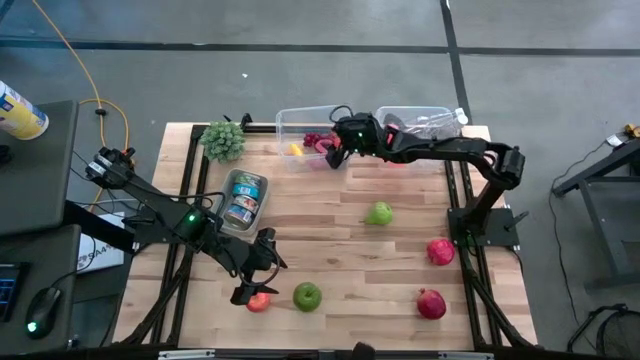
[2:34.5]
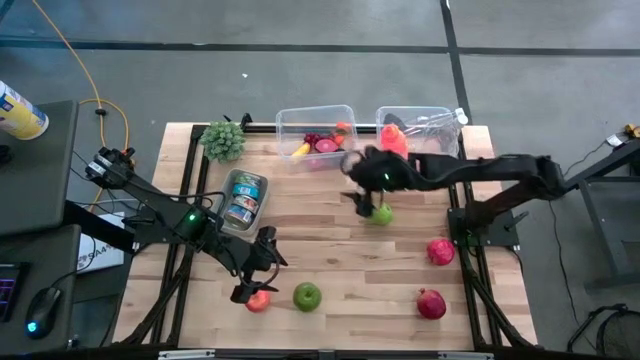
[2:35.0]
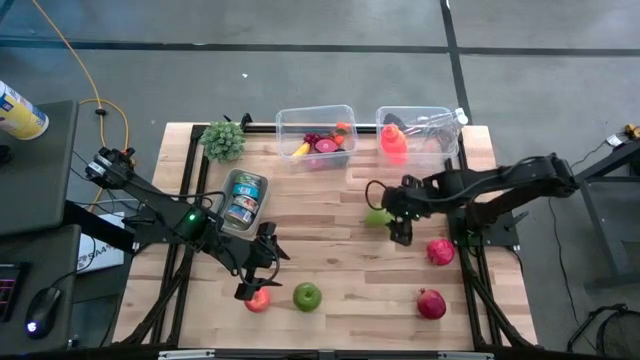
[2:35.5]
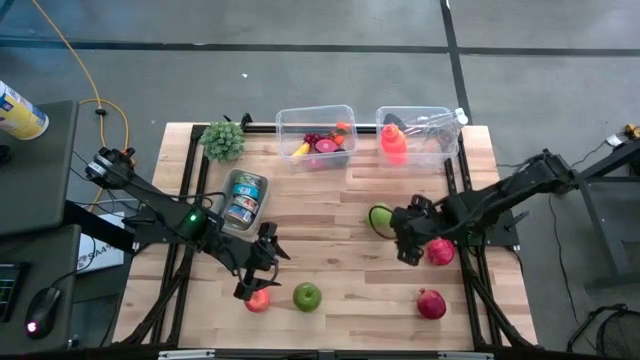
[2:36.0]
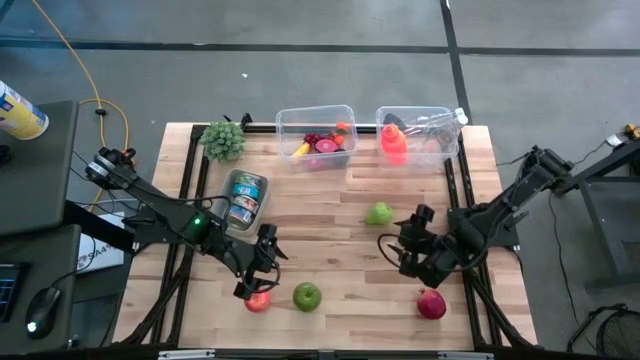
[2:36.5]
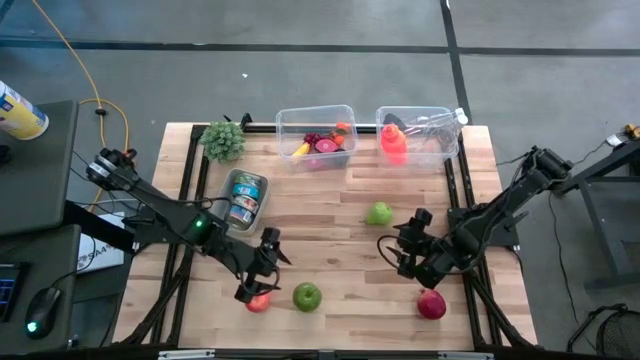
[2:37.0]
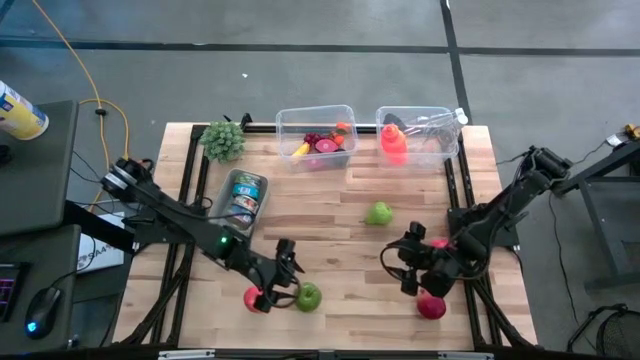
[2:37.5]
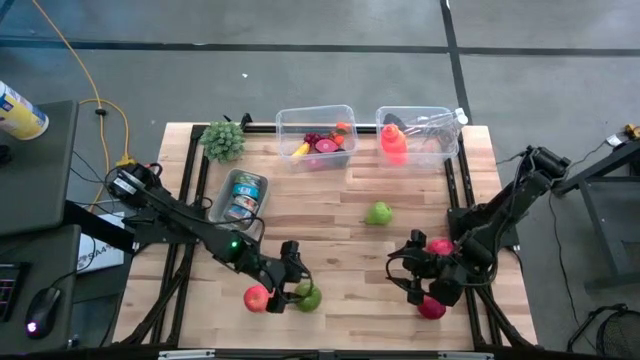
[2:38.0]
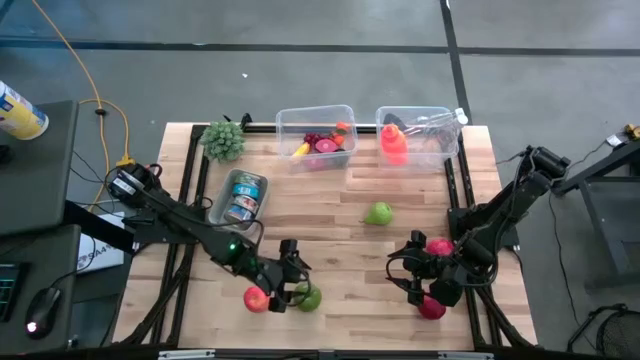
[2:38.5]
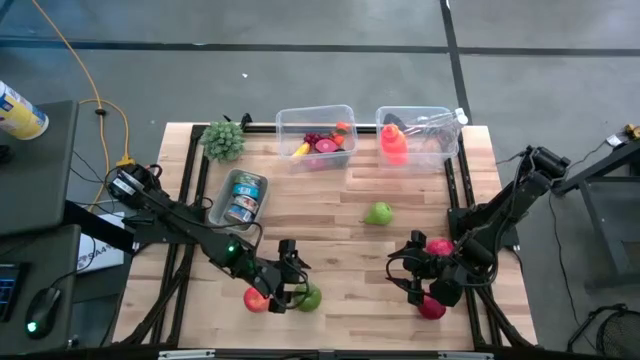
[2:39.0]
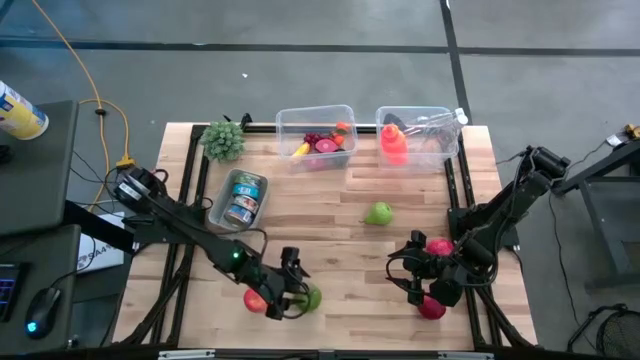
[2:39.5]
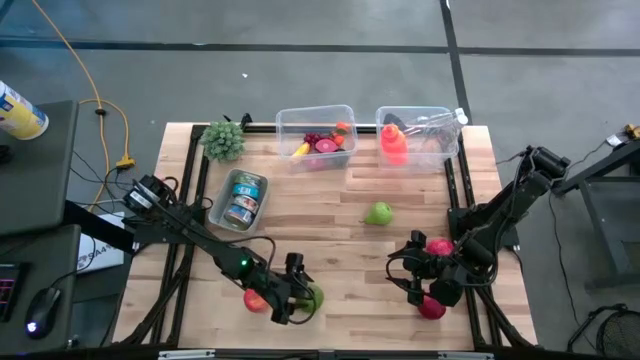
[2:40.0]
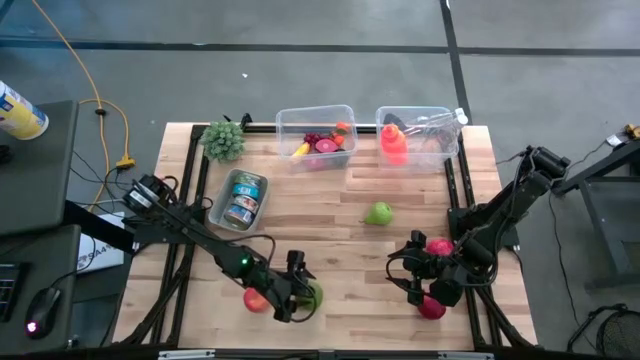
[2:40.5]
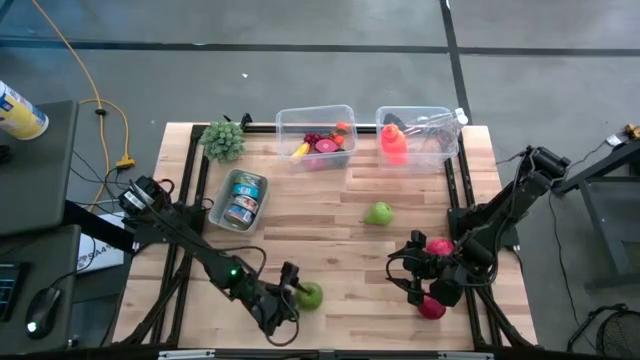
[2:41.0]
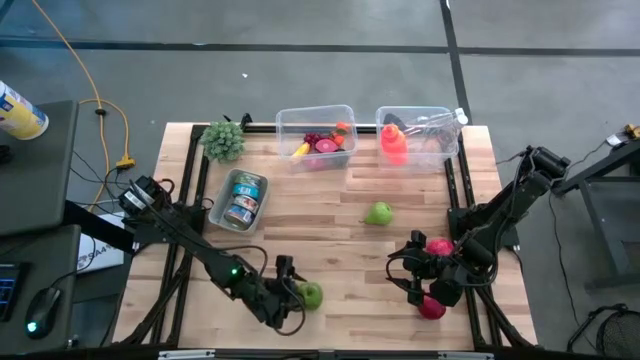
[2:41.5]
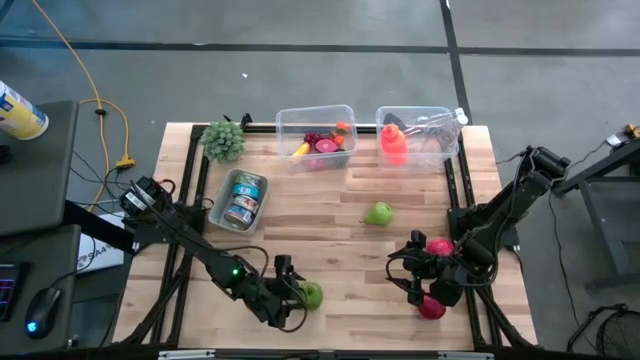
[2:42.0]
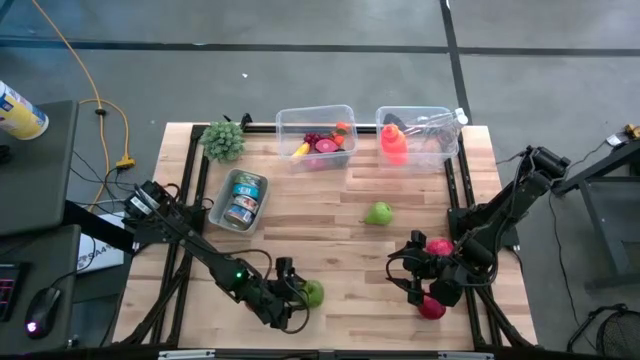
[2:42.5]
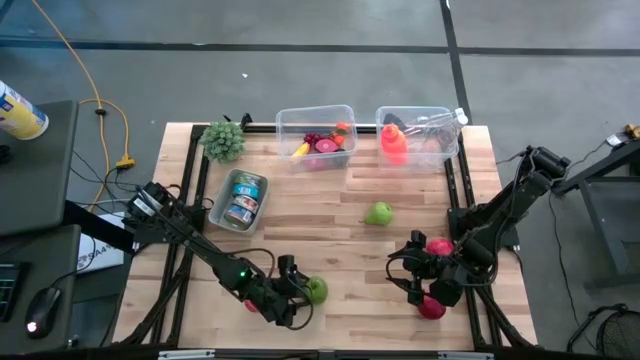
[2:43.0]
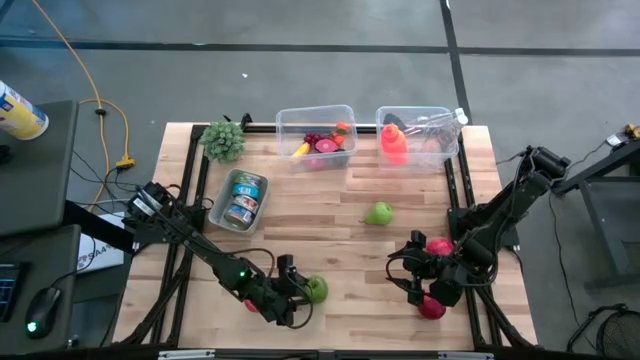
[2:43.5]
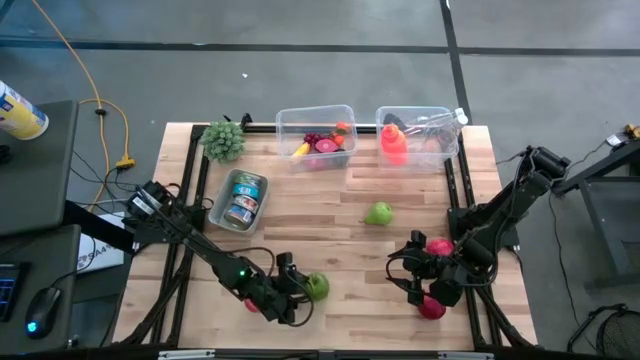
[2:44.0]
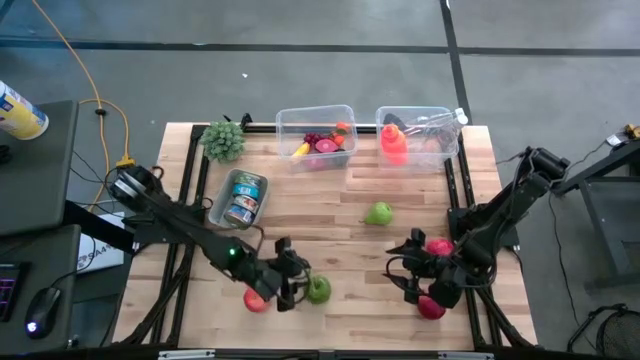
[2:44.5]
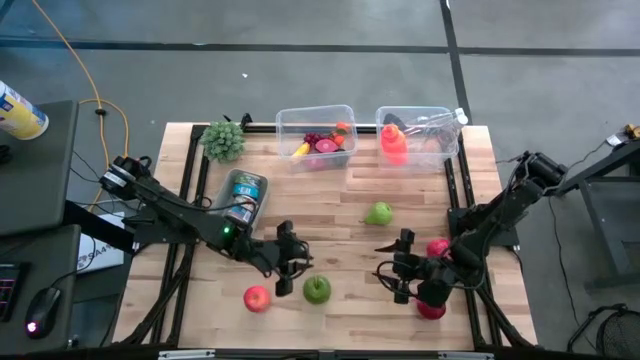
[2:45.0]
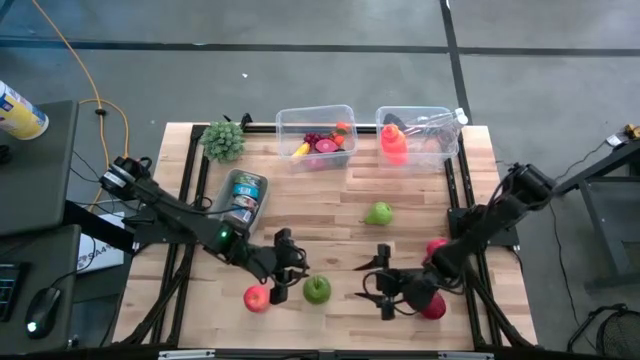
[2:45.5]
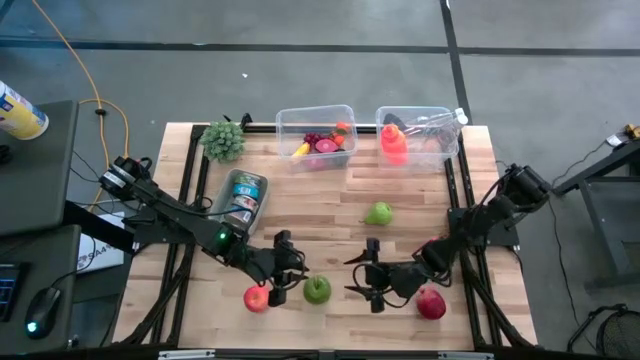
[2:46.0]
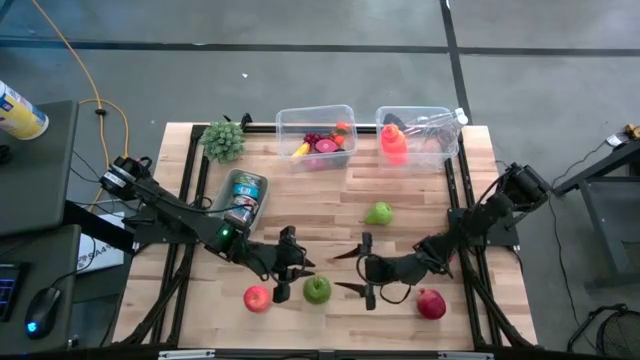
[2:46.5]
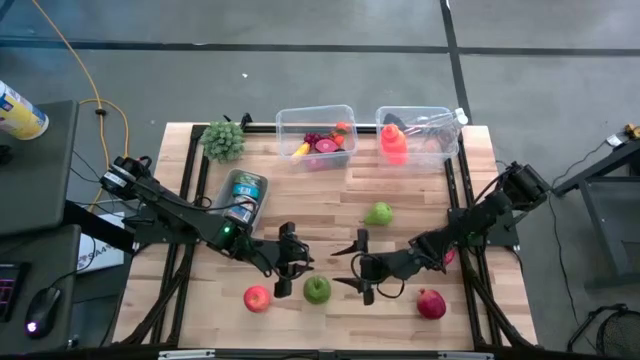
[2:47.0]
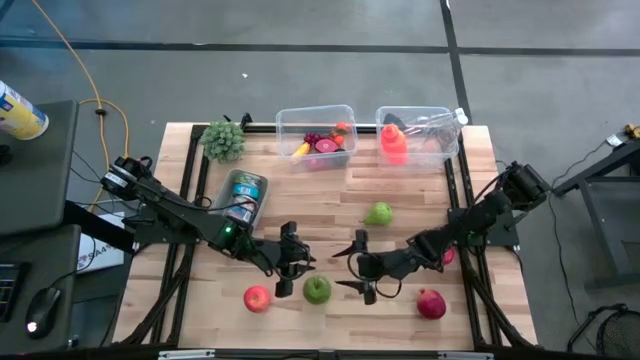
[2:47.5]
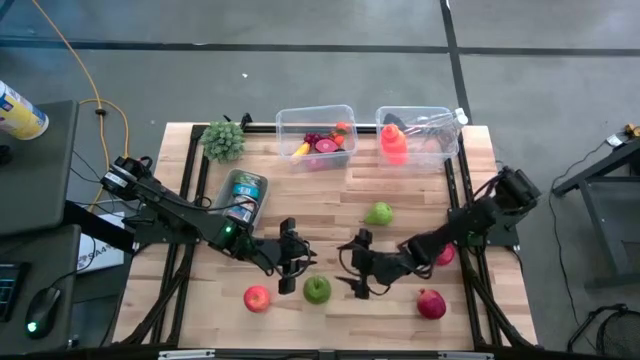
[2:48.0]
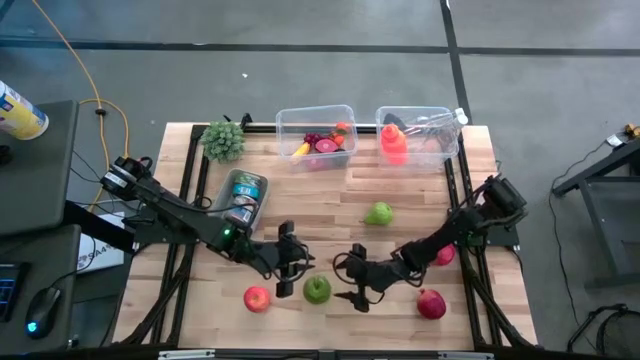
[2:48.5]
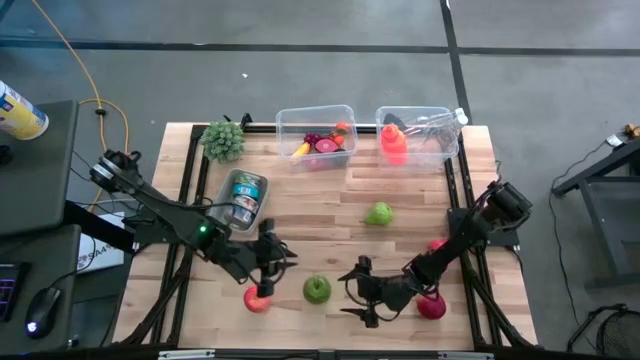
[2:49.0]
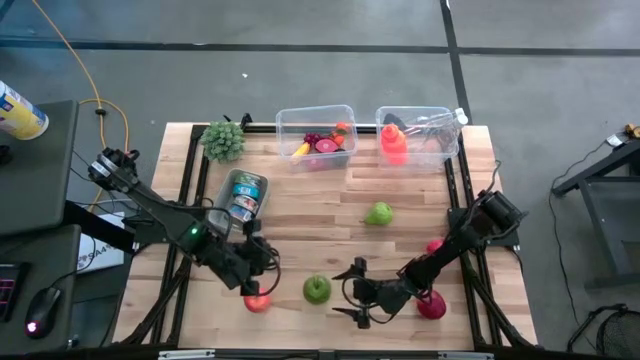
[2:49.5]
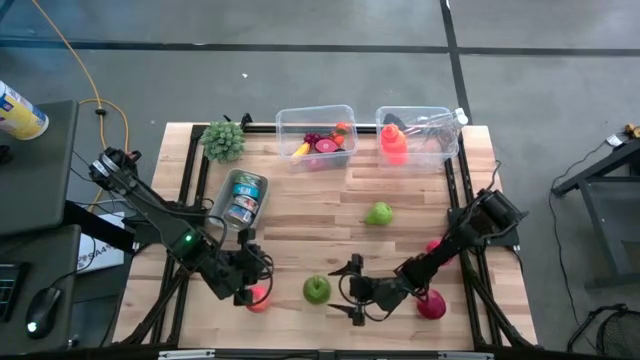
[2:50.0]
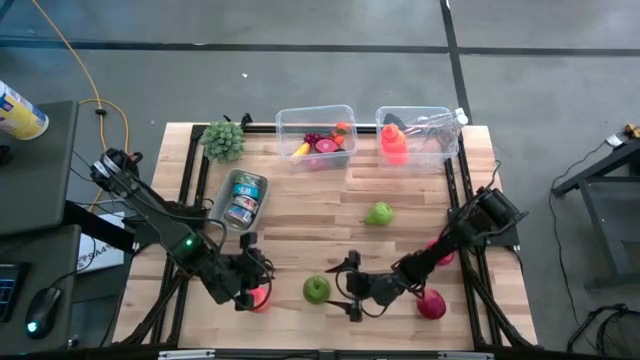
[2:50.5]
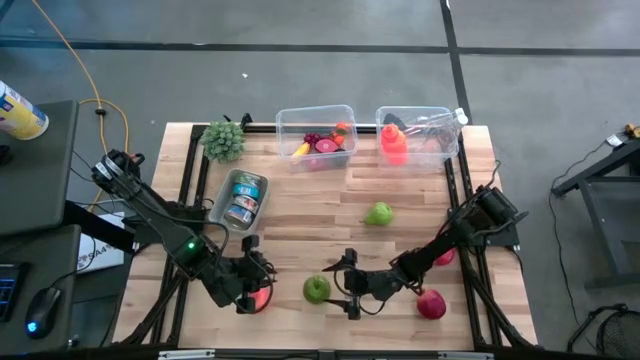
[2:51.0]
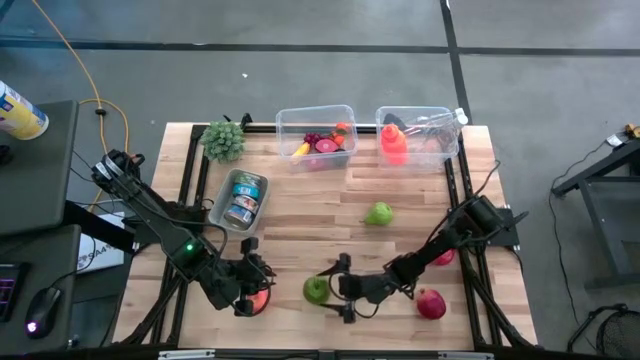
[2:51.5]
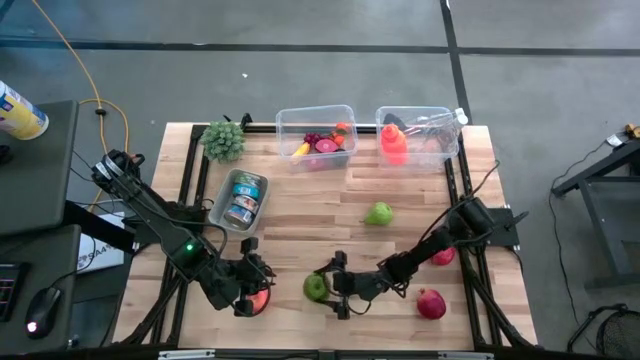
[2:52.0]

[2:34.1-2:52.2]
Task: Pick & Place Food Item
Put the green apple into the transparent bin

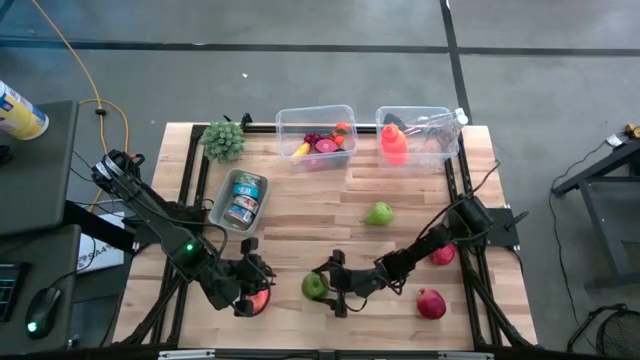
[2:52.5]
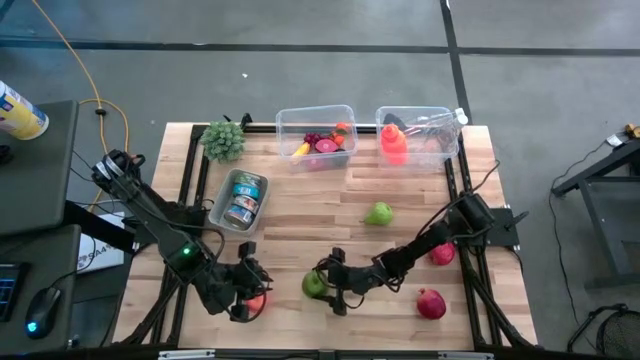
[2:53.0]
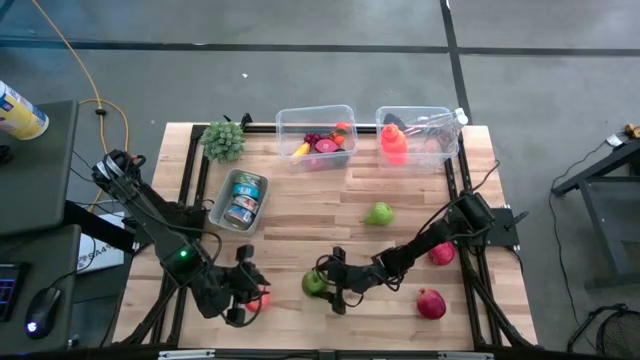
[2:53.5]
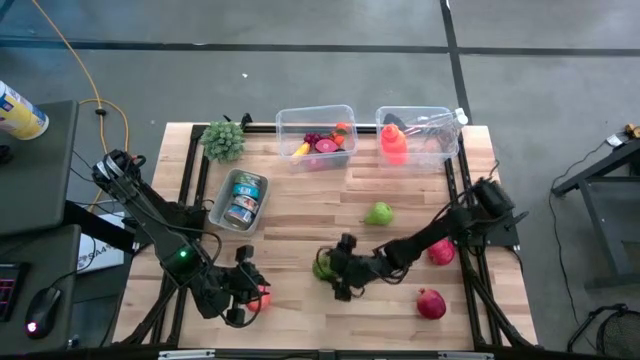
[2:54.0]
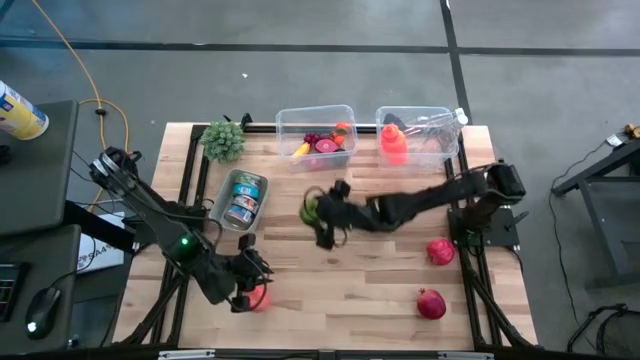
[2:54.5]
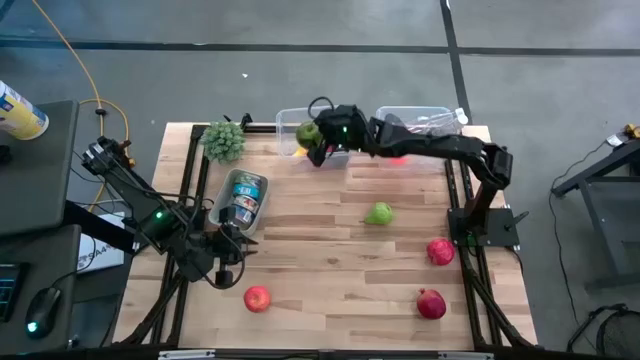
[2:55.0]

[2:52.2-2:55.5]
Put the green apple into the left transparent bin

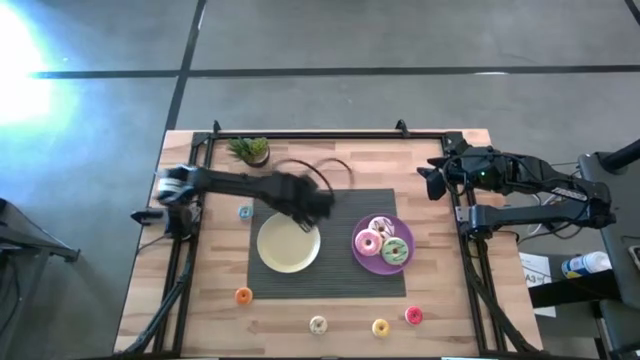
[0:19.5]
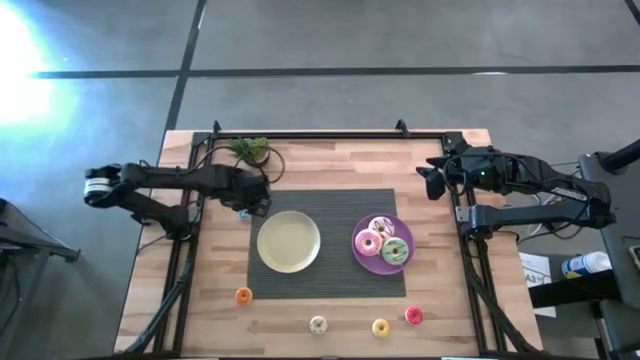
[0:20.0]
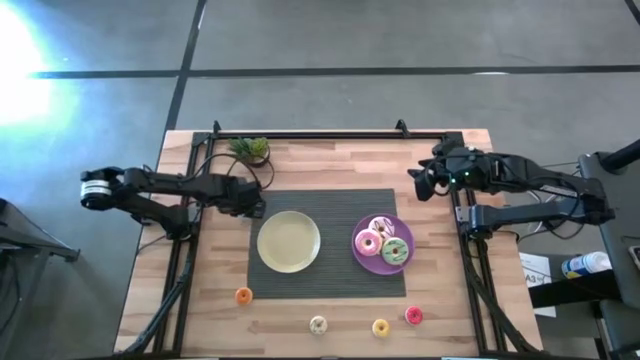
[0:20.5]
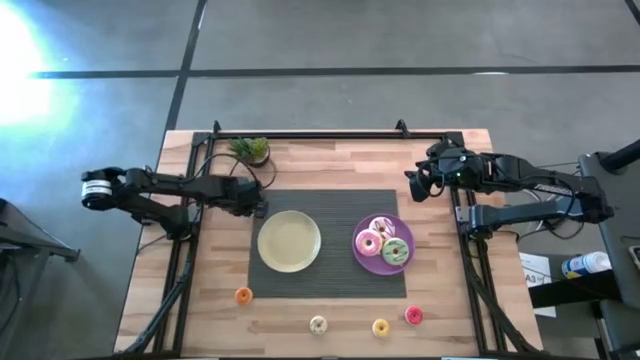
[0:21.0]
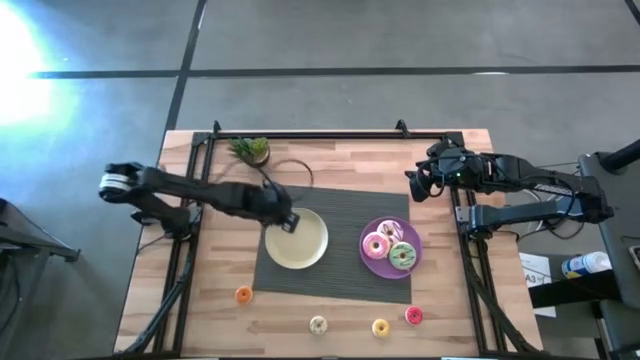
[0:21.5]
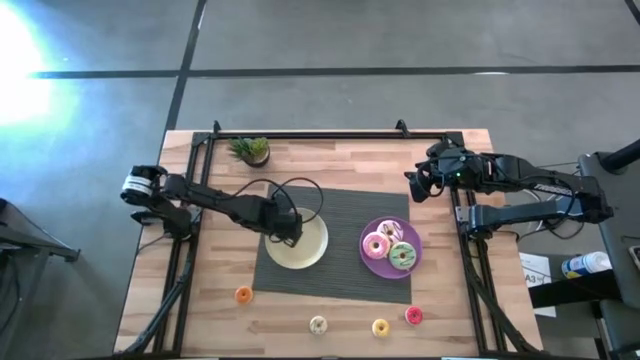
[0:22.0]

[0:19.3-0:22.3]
Task: Pick & Place donuts
Put the small blue donut on the beige plate
